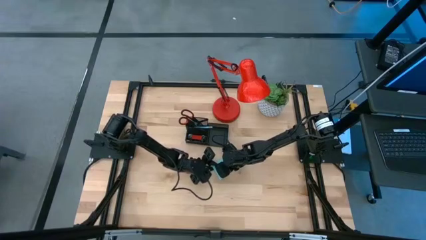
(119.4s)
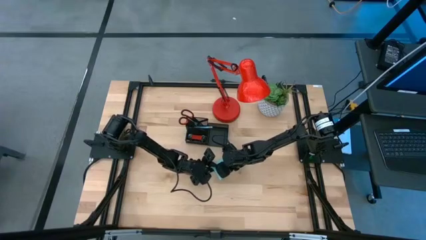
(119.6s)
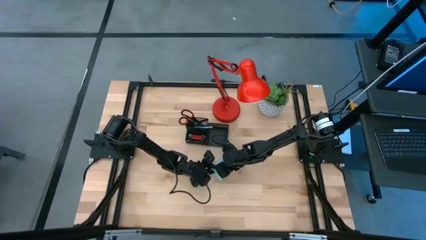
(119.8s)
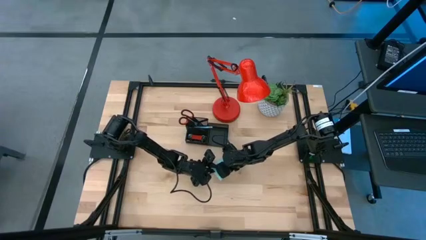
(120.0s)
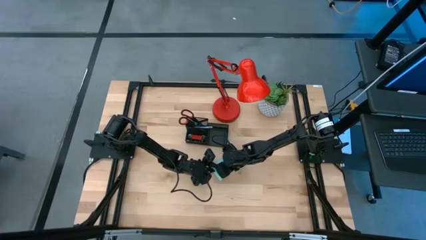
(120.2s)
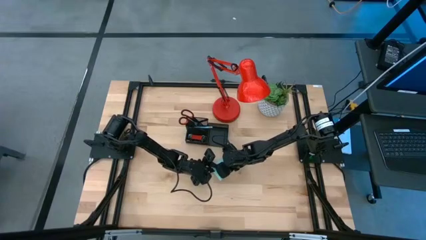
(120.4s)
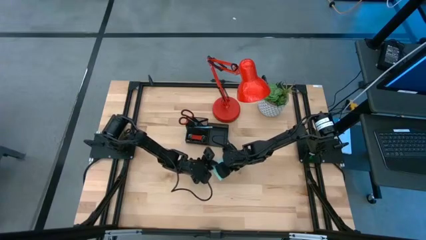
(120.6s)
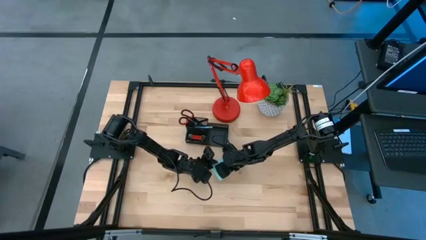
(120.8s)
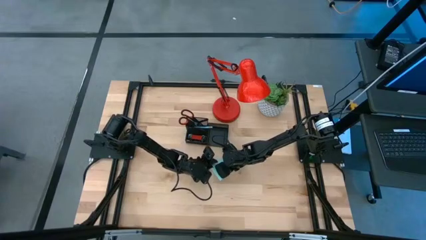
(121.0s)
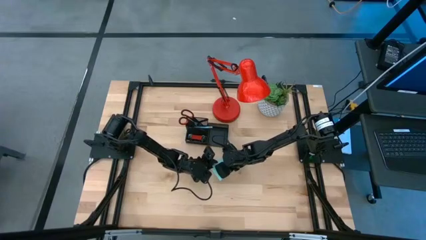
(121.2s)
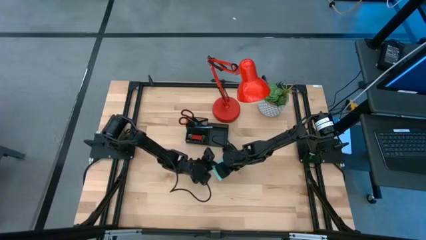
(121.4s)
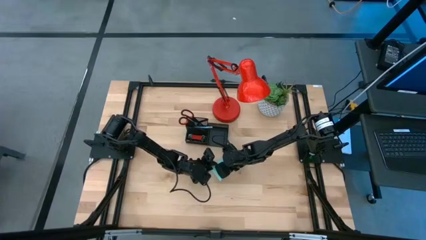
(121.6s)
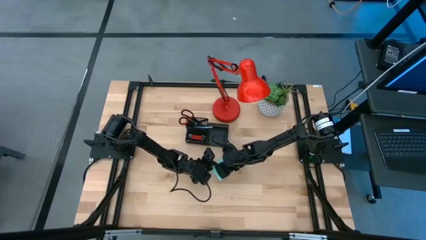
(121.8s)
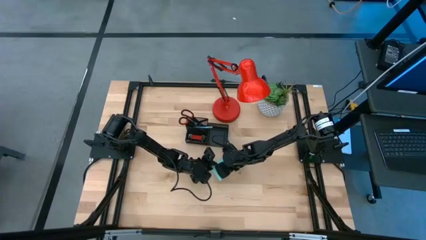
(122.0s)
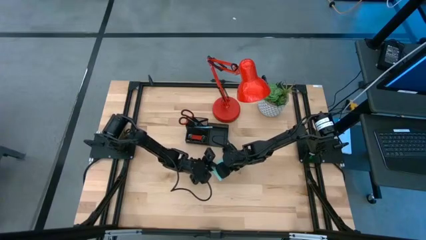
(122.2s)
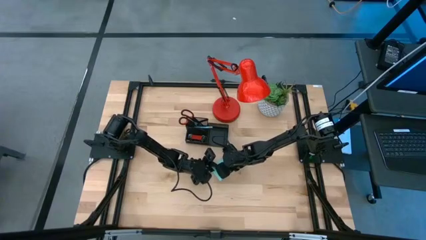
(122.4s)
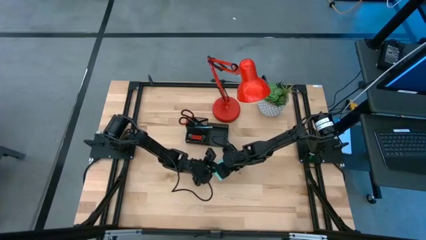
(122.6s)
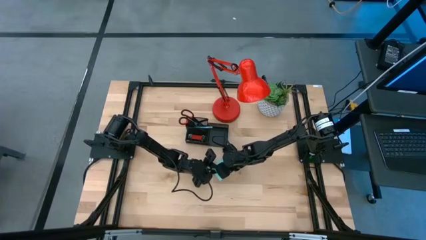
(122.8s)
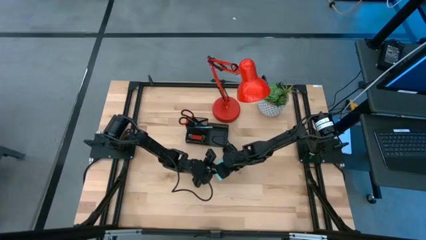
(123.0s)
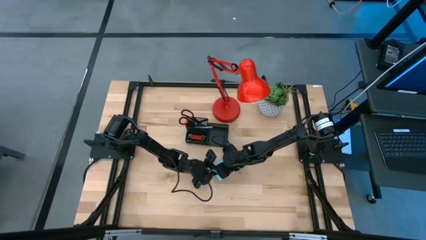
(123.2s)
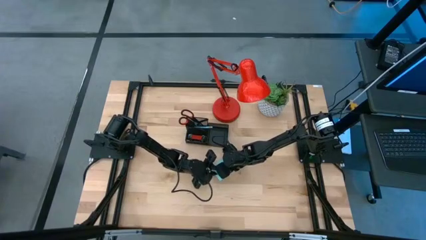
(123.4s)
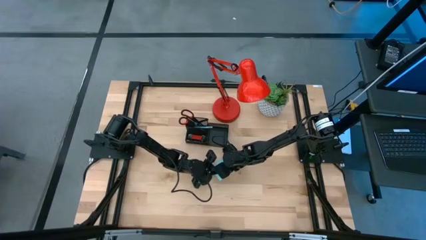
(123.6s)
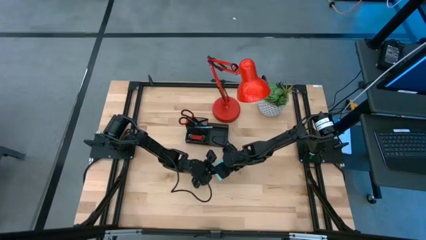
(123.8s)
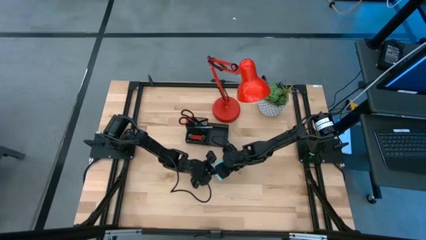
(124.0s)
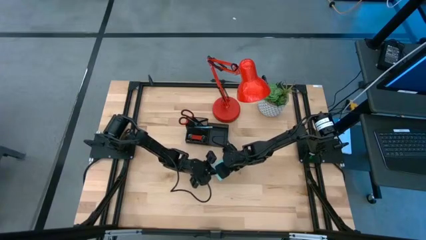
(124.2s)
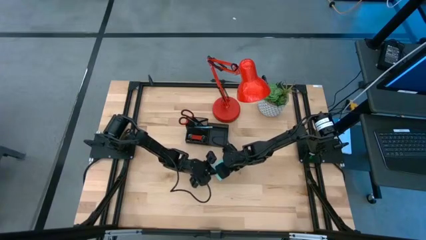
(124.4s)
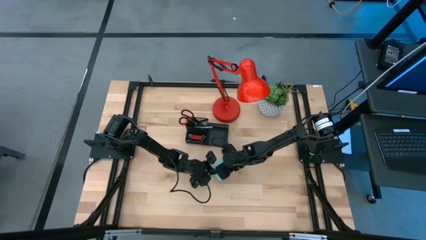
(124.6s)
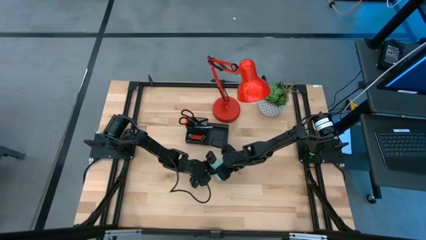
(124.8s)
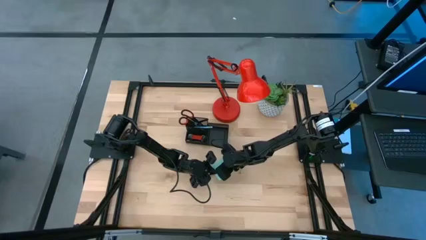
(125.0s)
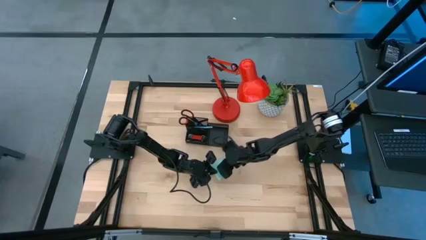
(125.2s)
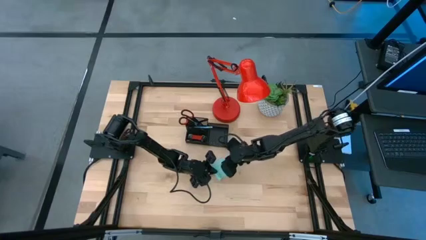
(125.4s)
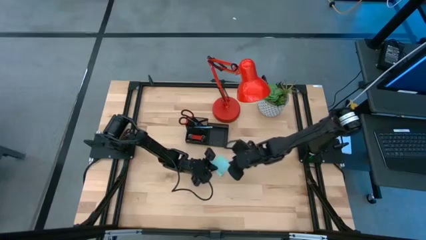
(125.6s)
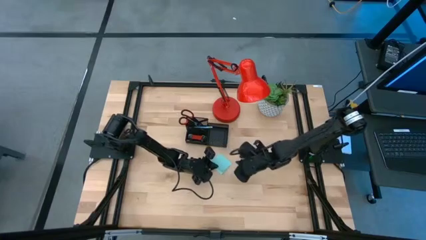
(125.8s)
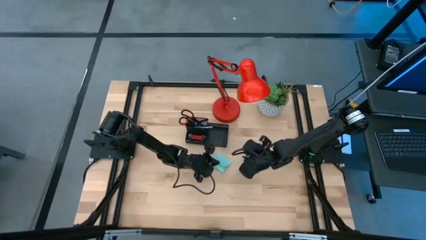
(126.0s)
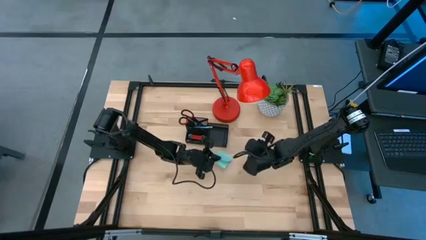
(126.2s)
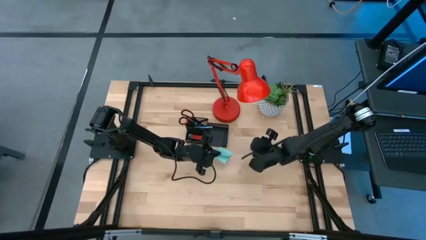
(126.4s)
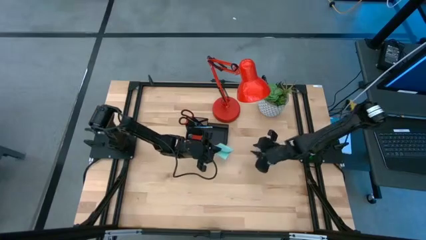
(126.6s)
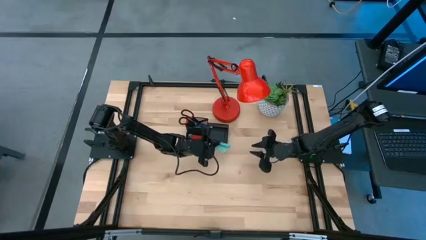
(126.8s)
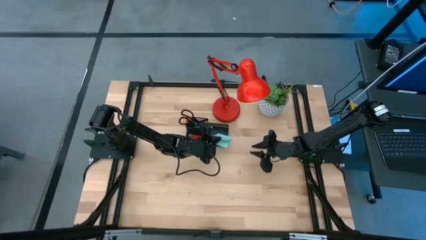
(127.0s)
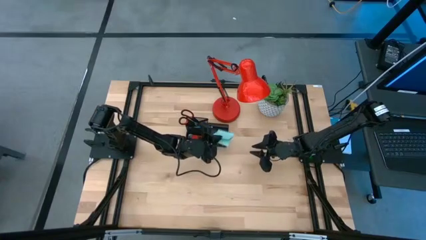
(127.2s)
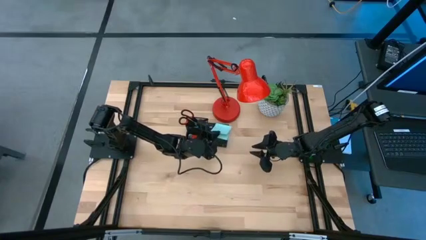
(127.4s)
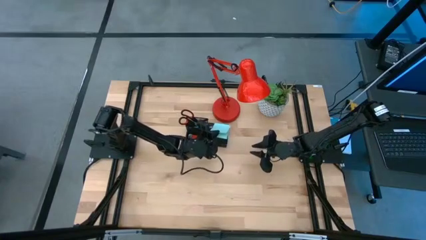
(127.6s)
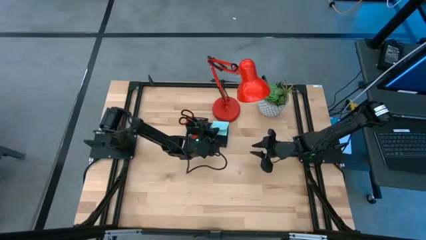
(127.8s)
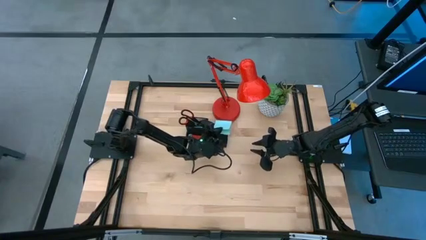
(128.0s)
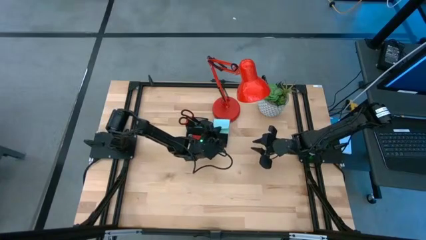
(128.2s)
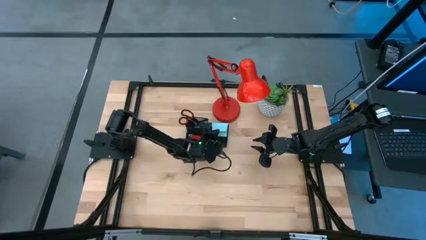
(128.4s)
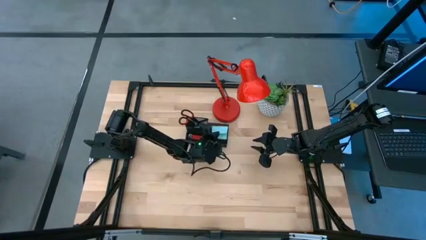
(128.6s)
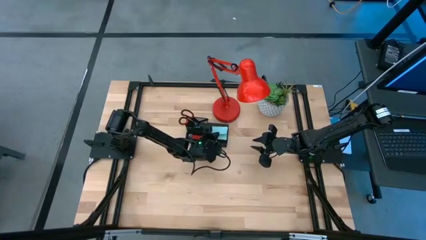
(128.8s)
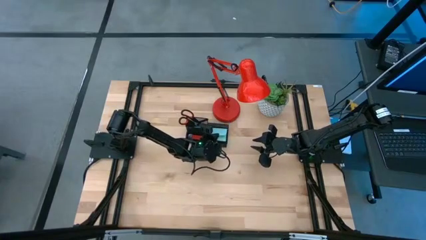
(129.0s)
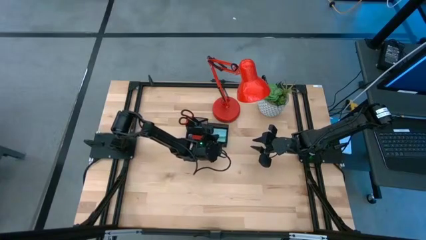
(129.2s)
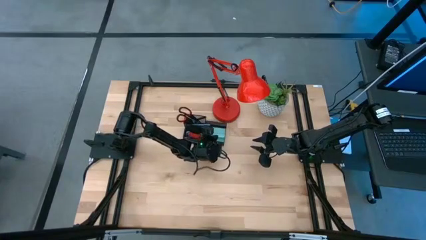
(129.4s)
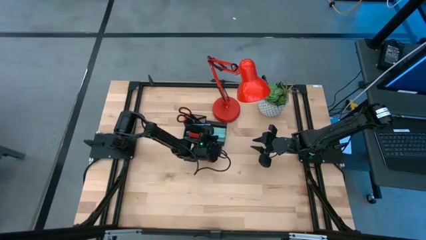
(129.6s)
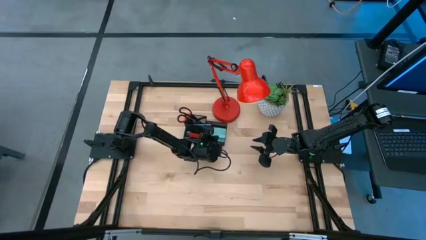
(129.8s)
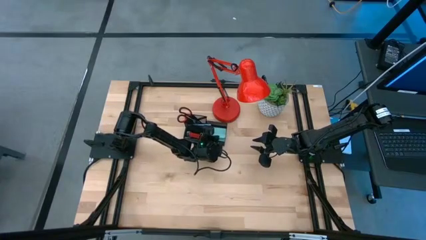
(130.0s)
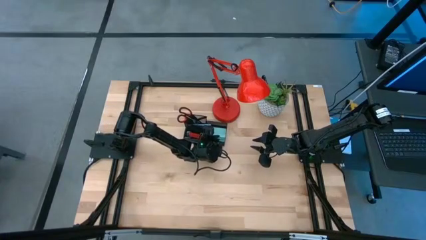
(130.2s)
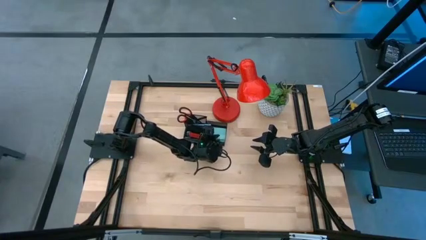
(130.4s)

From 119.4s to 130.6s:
Task: Pick and place office supplies into organizer
Put the blue sticky note into the black desk organizer

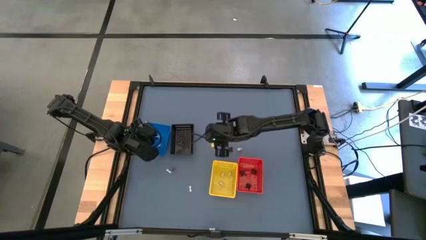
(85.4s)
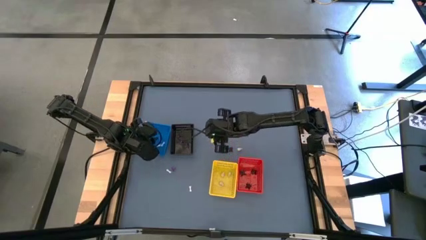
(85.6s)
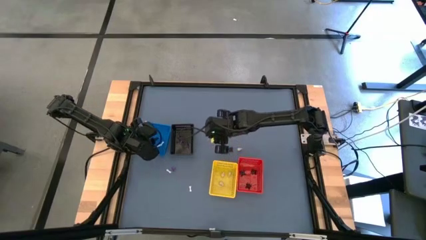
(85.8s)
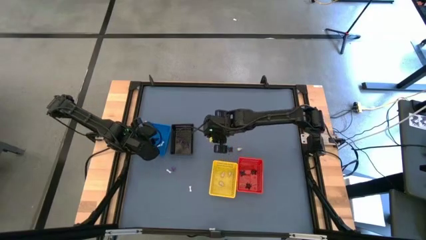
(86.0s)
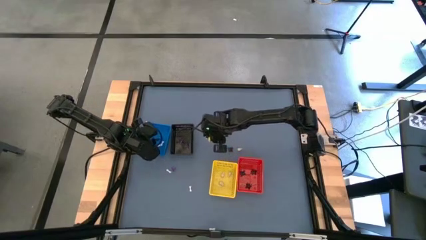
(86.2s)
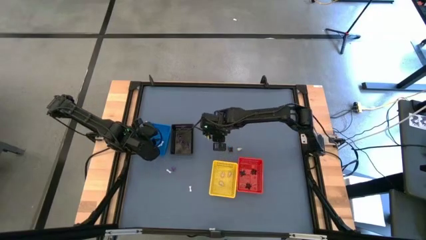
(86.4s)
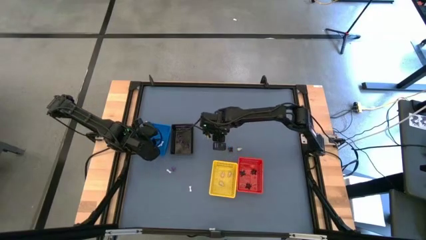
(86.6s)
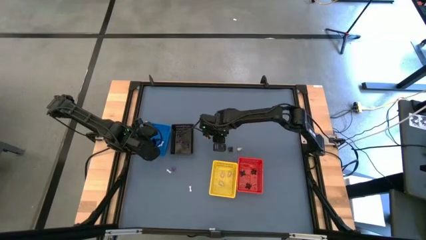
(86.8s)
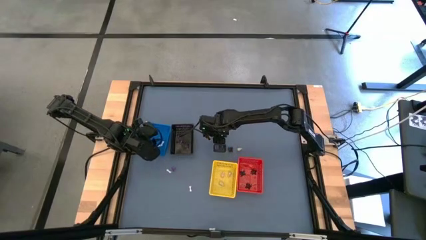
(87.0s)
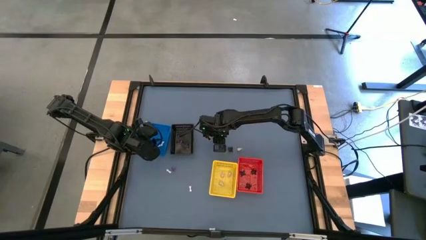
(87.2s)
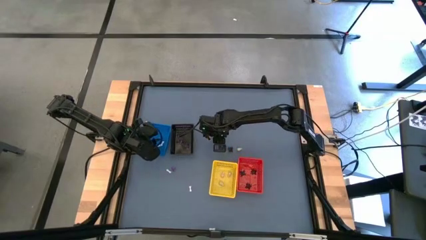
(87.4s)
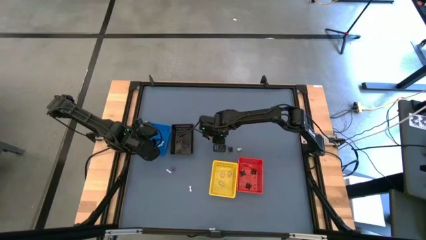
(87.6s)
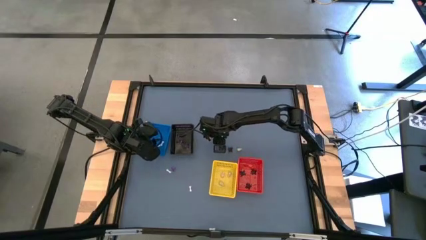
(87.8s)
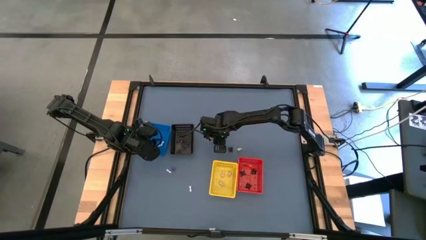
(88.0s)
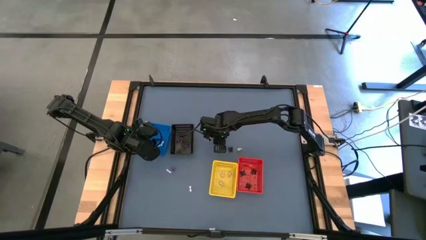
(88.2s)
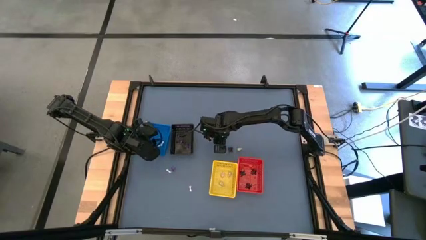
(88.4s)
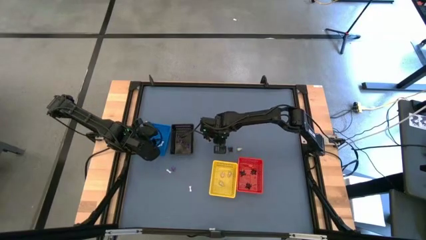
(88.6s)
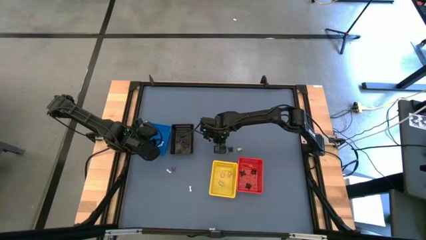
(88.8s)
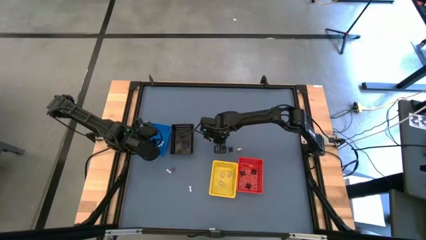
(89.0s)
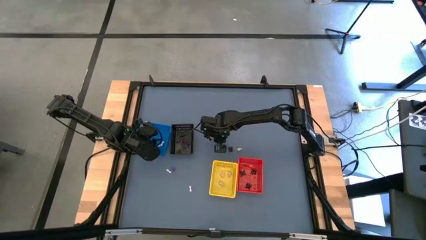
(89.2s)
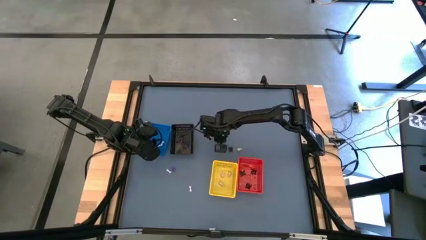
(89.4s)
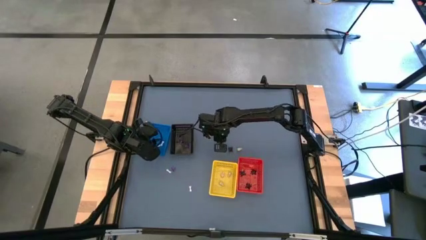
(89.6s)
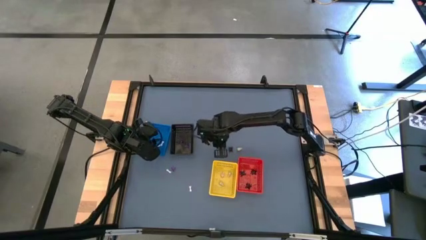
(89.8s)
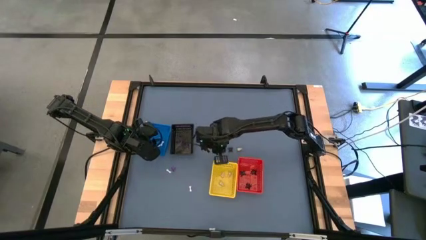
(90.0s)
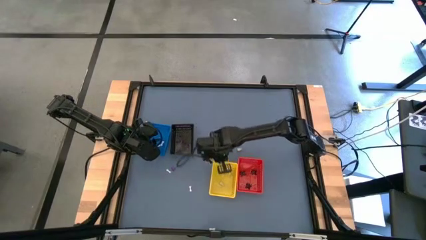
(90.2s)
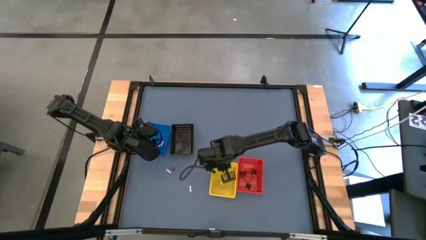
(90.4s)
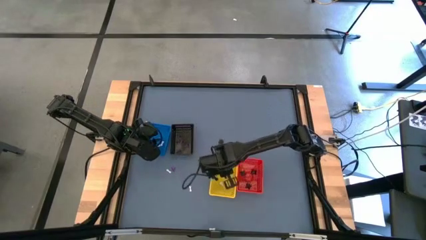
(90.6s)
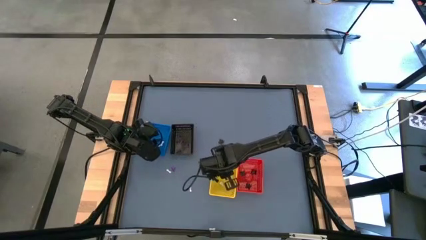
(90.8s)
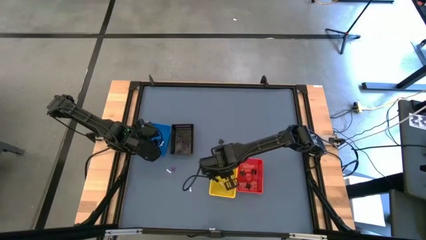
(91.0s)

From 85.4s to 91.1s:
Task: Sort Halloween decoration
Put the skull toy into the yellow bin
